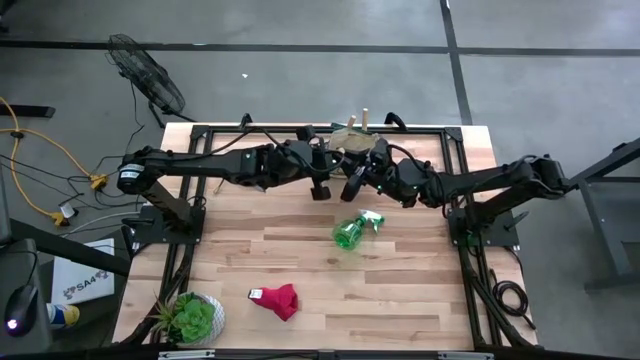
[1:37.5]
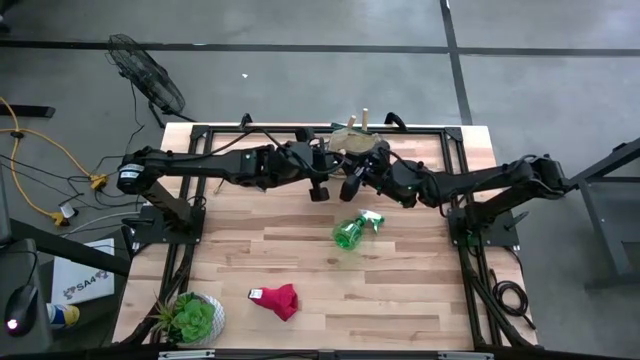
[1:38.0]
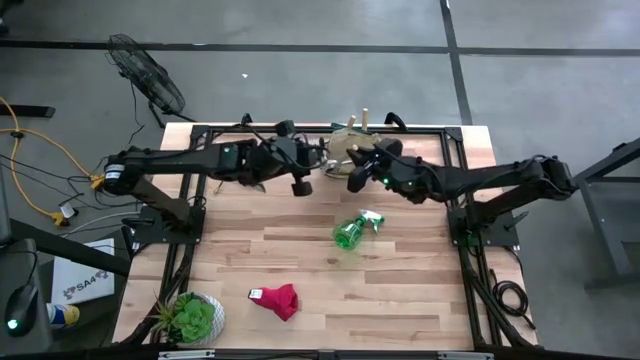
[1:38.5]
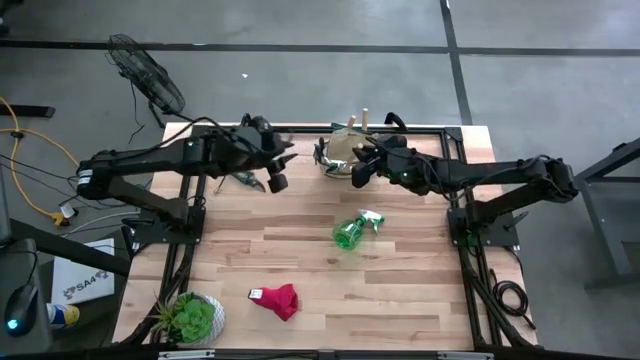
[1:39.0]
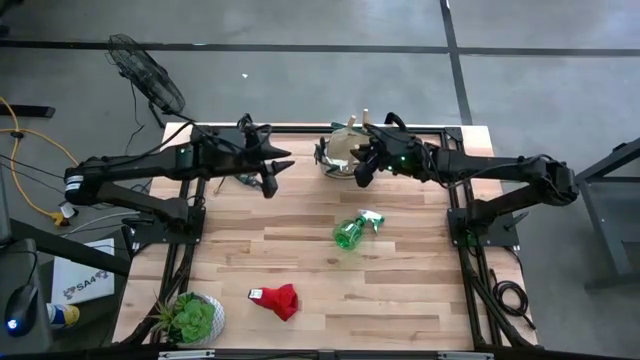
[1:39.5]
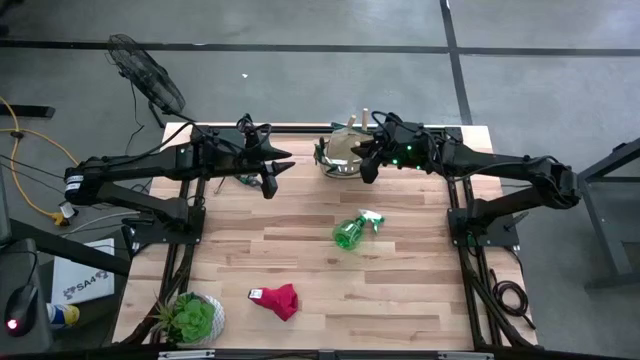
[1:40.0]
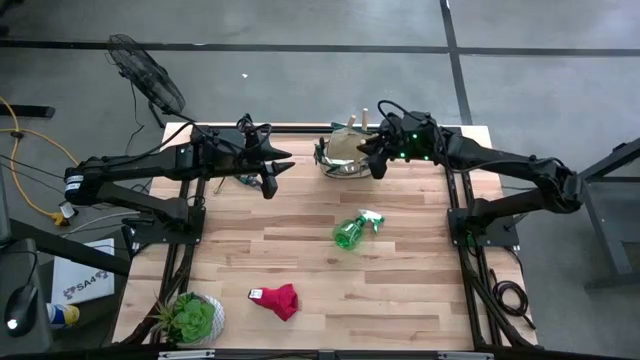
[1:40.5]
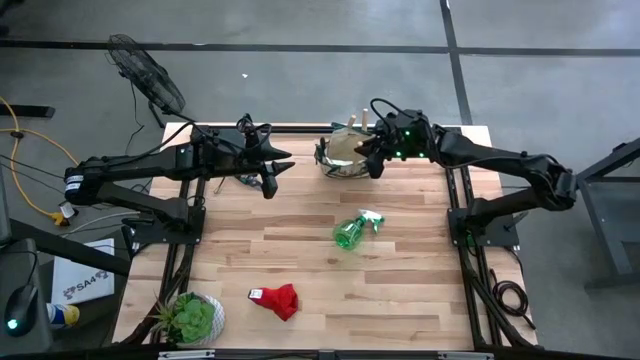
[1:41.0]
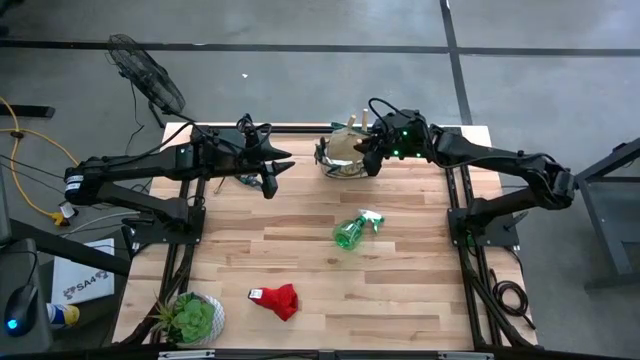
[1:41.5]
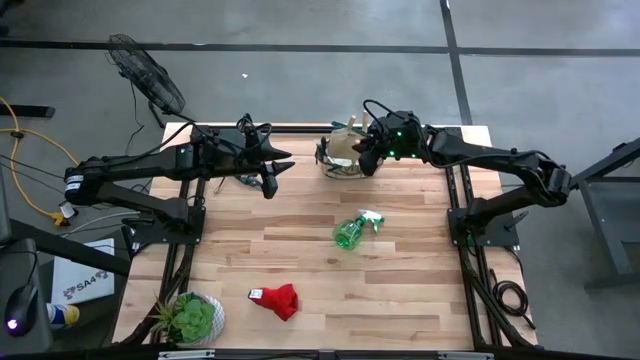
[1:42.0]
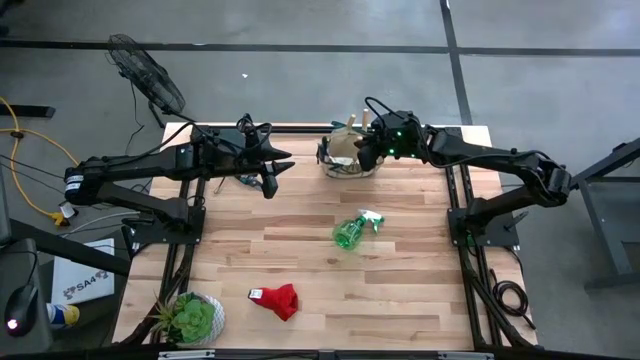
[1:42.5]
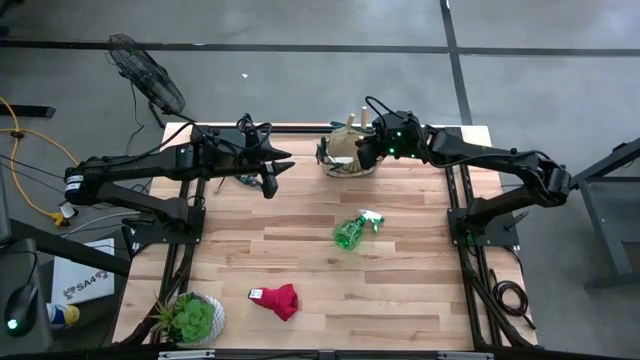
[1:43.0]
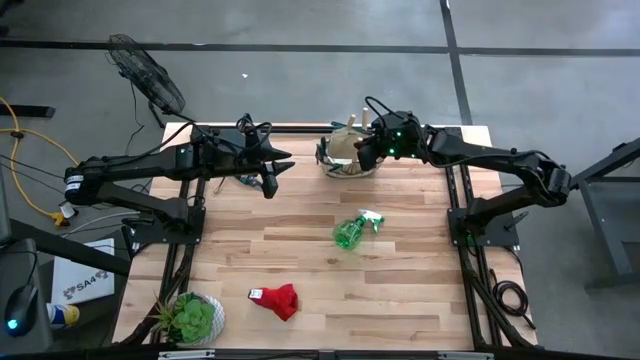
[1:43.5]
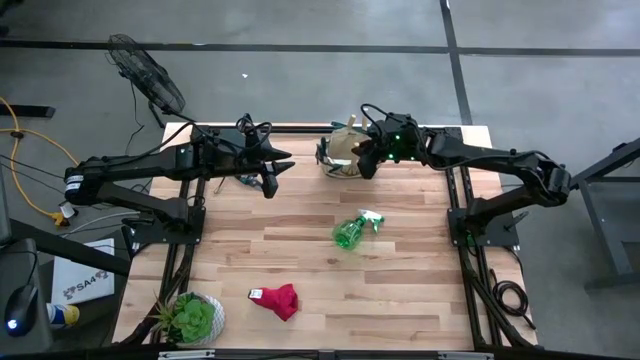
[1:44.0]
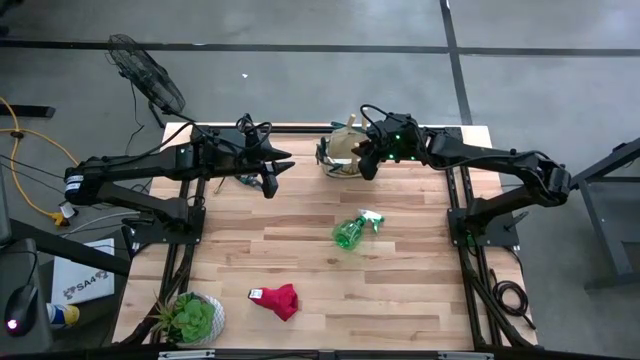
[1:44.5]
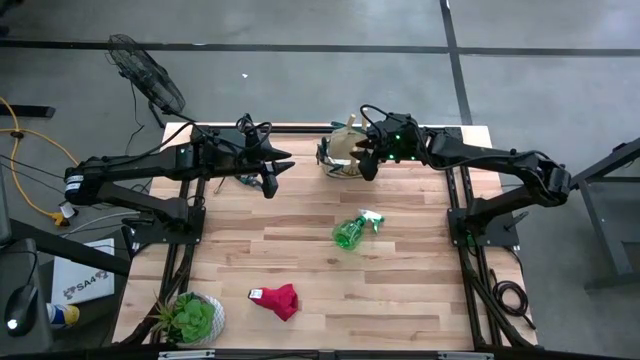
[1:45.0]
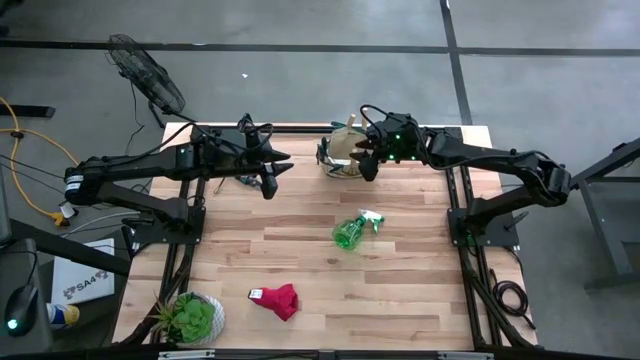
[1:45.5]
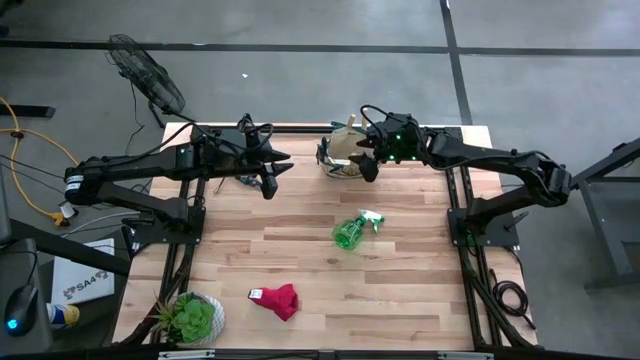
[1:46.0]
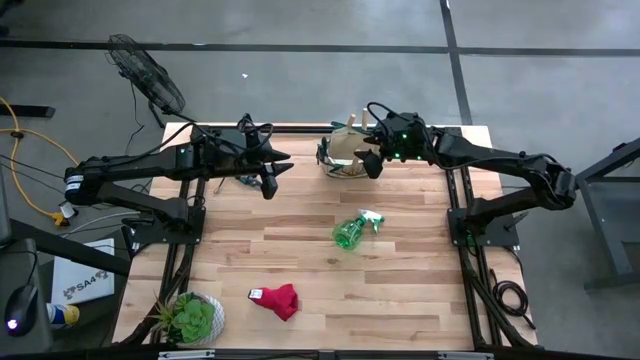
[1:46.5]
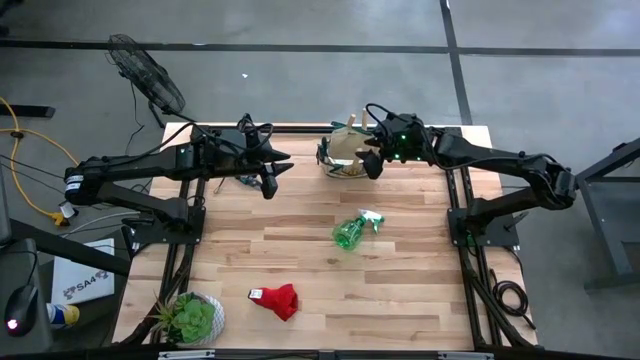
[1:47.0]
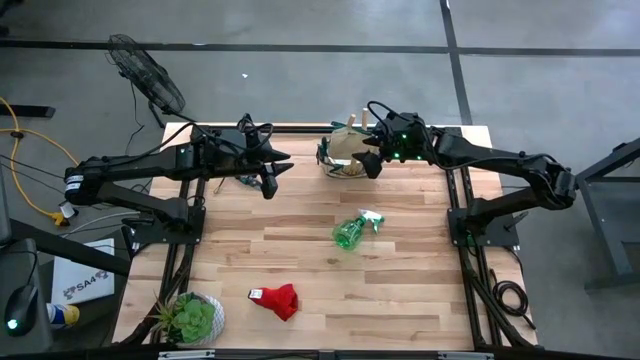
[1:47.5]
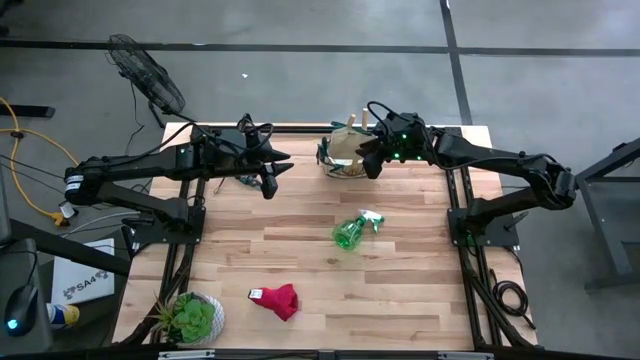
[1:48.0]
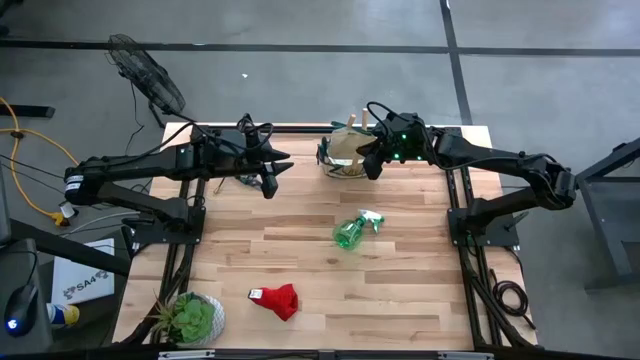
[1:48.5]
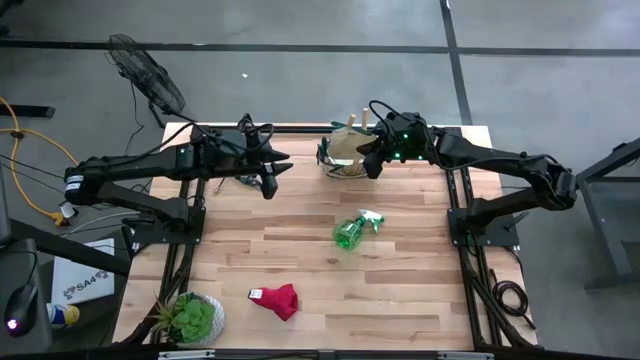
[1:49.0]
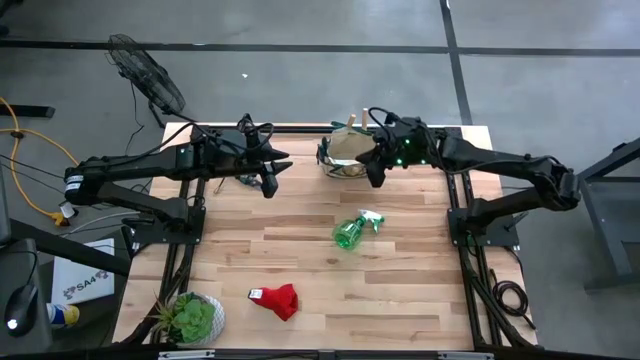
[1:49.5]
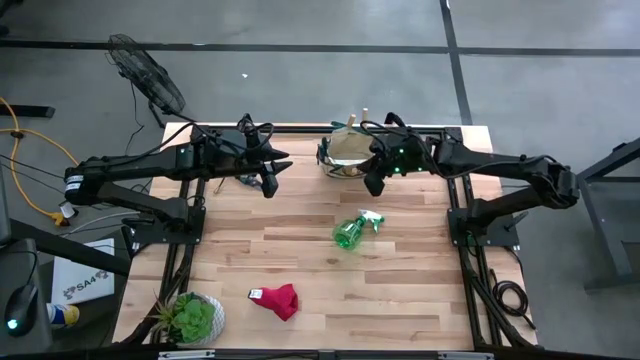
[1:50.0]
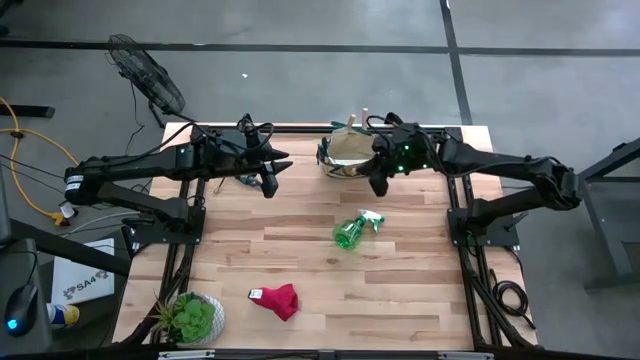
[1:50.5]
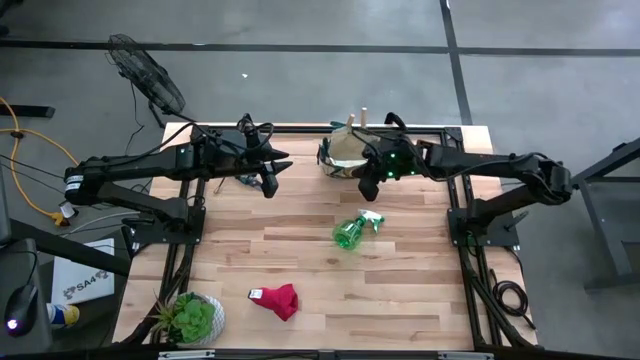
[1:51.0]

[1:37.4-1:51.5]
Task: Pick & Place Garden tools in Gardening bag
Put the hand rake into the gardening bag

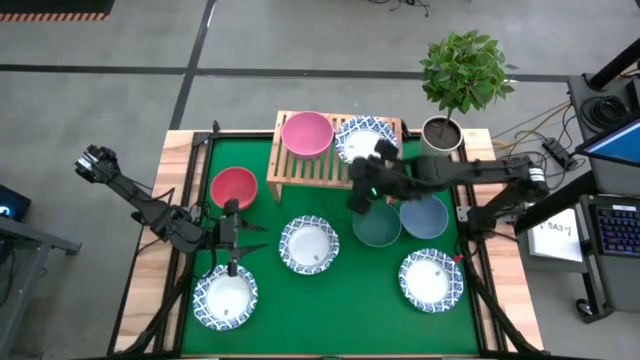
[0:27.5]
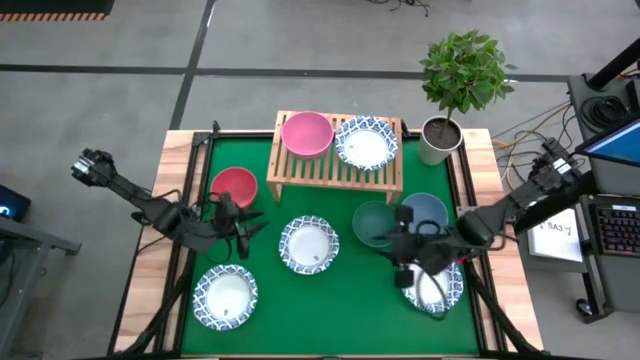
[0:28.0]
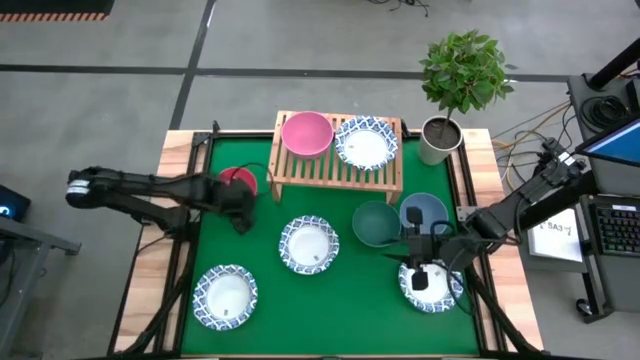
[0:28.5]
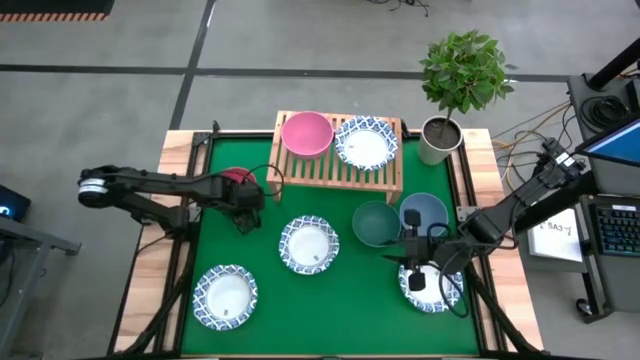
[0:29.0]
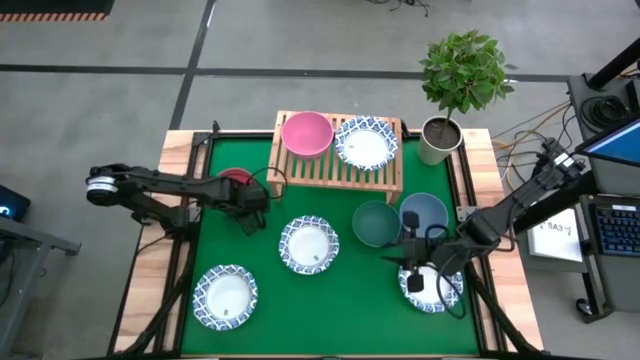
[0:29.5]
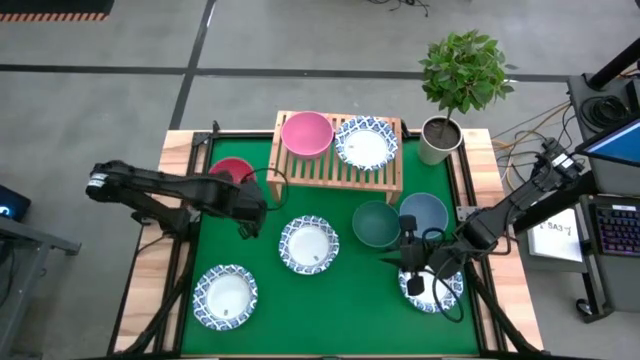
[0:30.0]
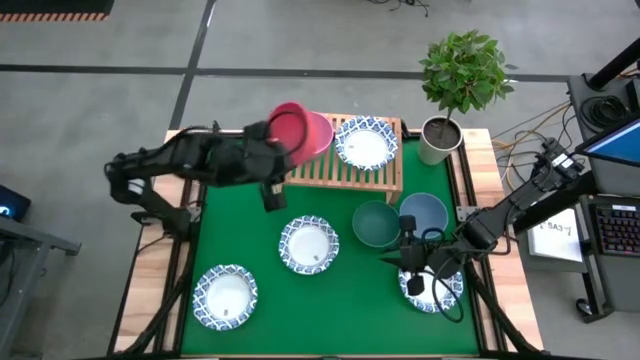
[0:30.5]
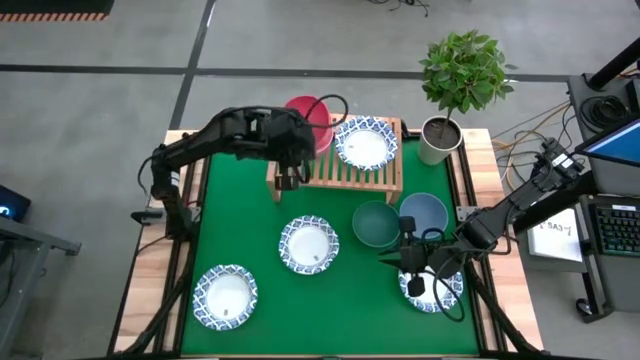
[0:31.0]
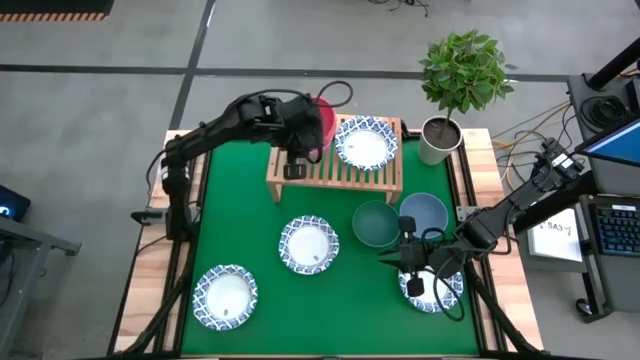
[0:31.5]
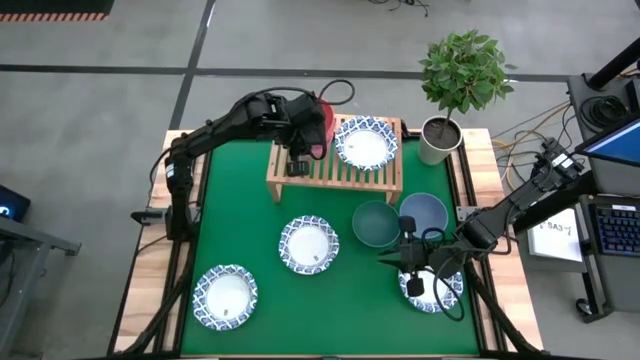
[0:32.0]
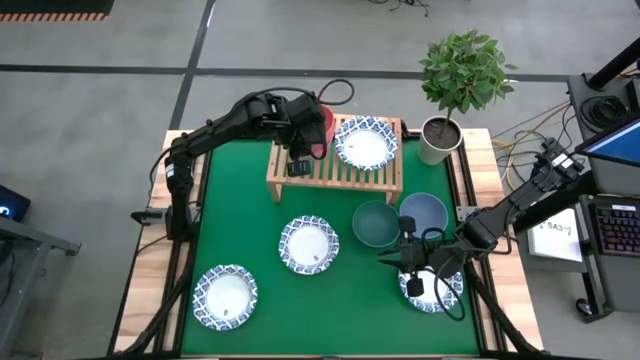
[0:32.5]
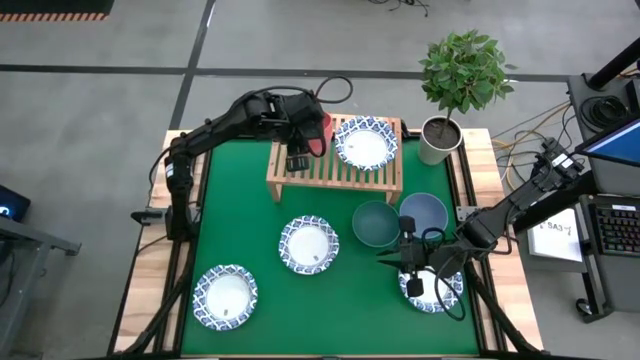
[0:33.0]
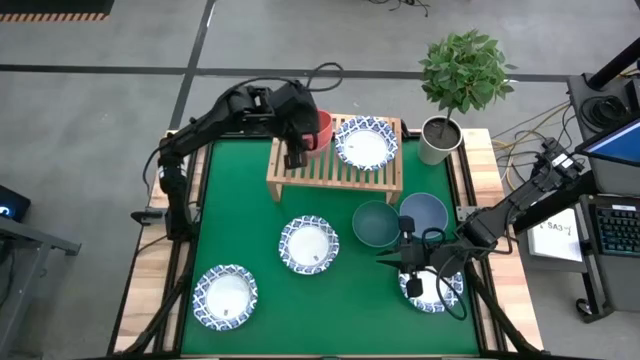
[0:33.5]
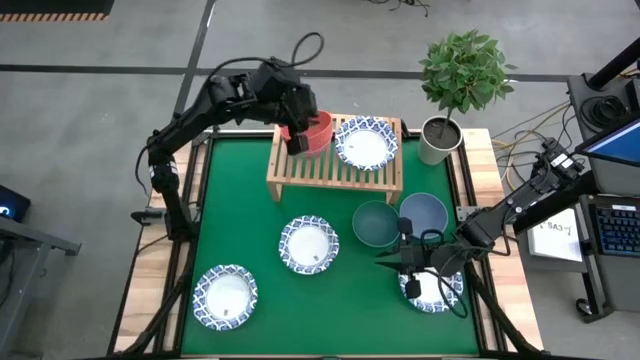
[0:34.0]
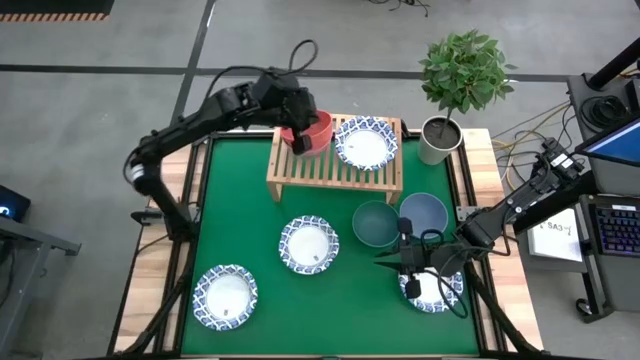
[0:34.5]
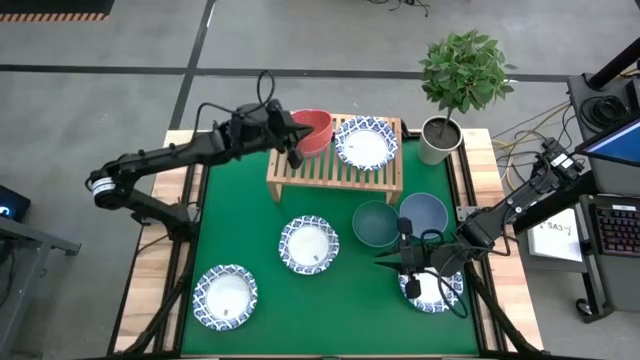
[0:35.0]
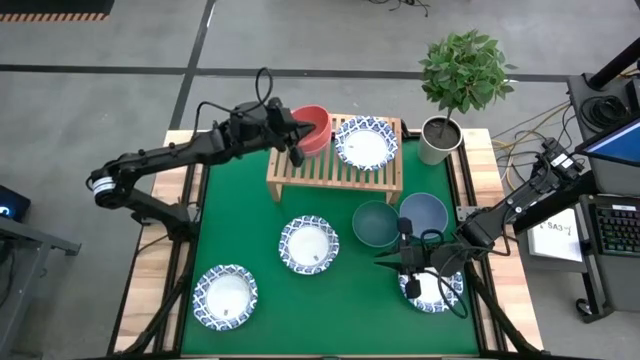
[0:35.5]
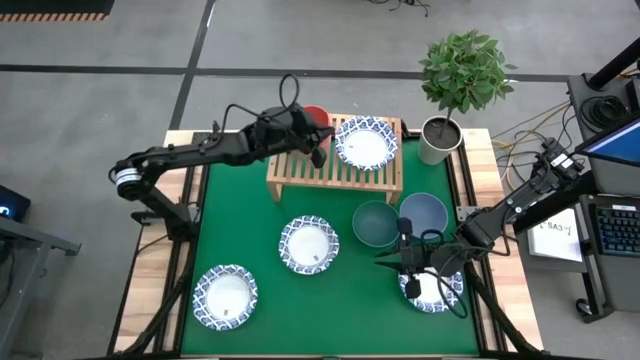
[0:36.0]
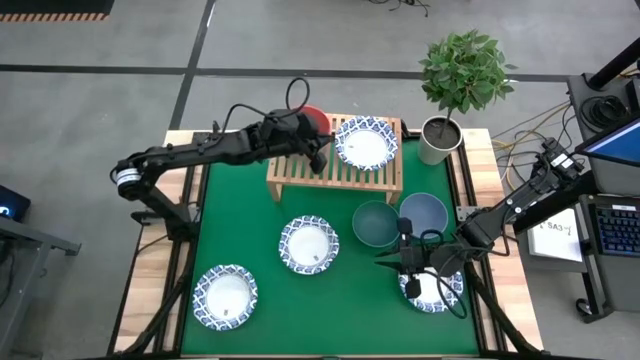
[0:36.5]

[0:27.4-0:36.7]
Task: Place and stack bowls onto a shelf
Stack the orange bowl on top of the pink bowl on the shelf
